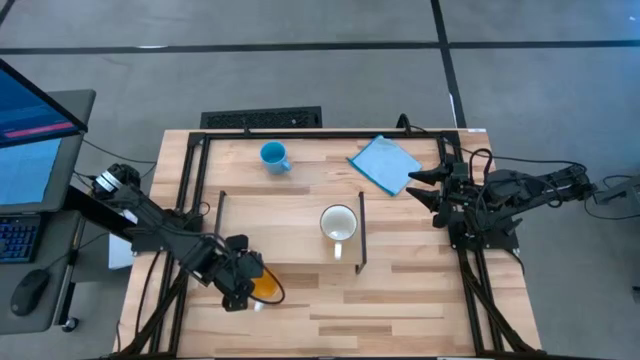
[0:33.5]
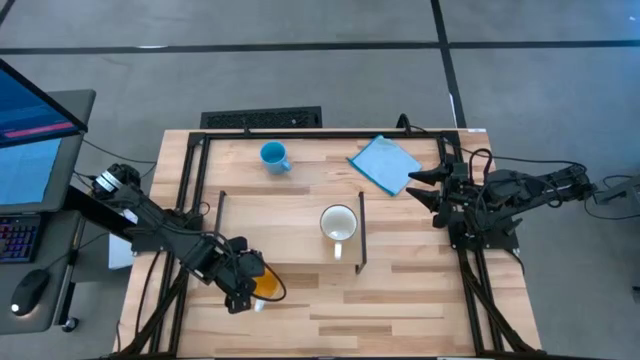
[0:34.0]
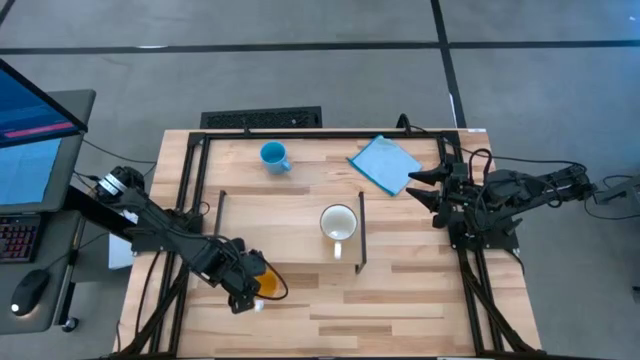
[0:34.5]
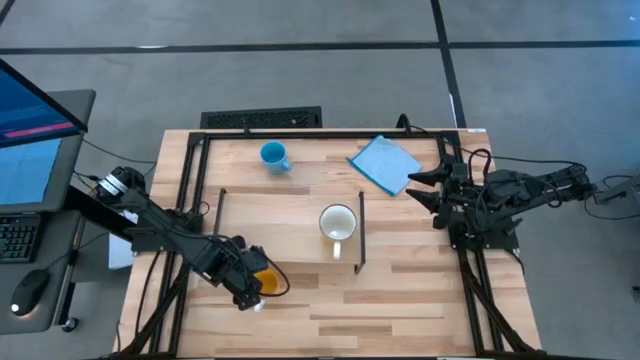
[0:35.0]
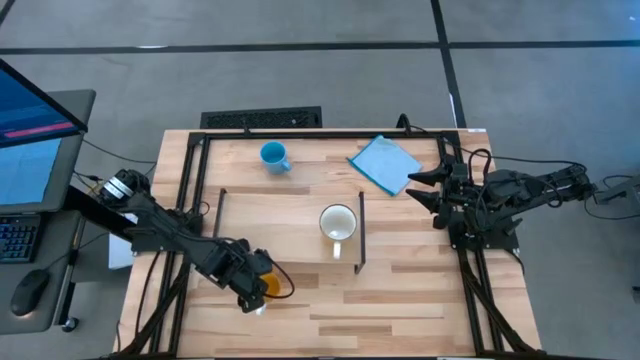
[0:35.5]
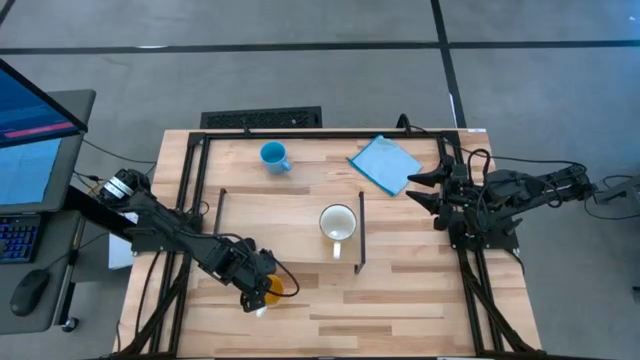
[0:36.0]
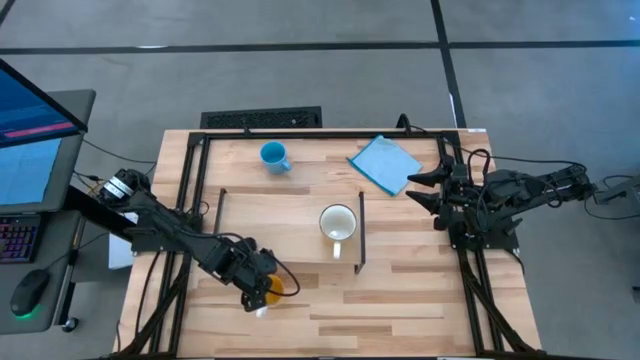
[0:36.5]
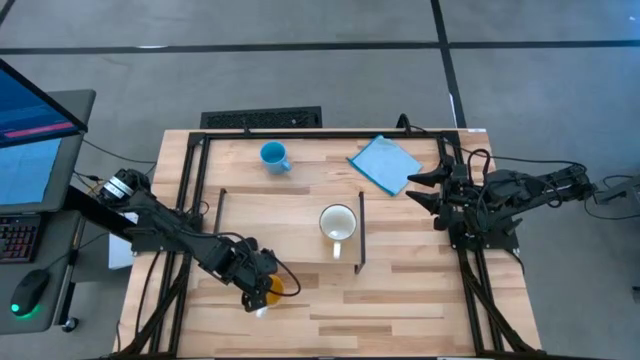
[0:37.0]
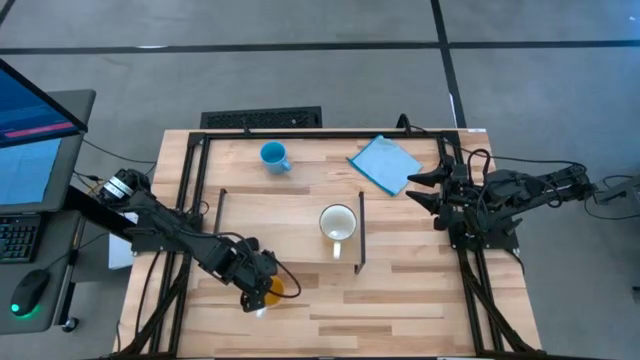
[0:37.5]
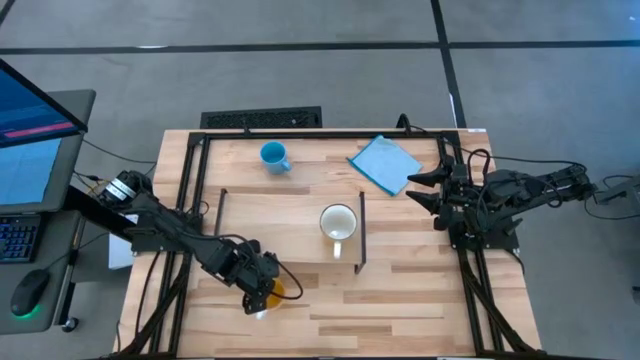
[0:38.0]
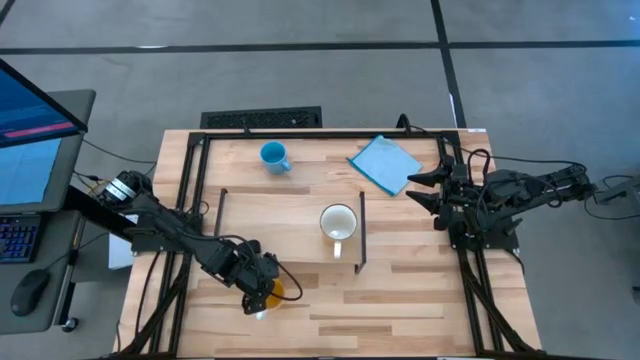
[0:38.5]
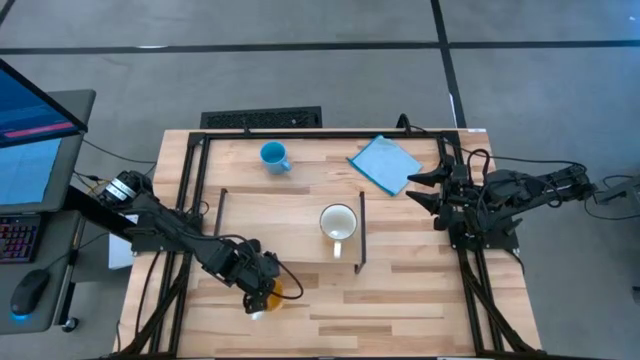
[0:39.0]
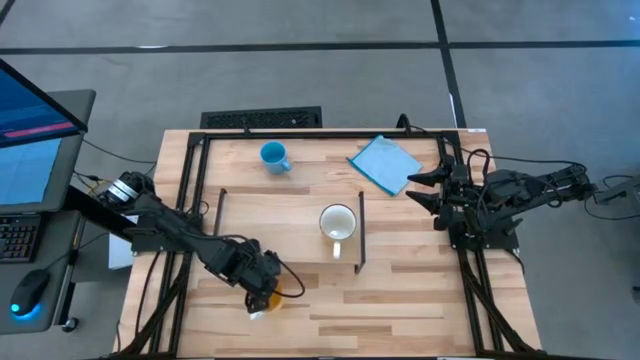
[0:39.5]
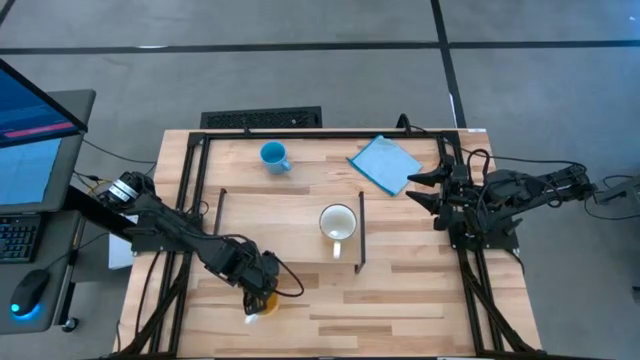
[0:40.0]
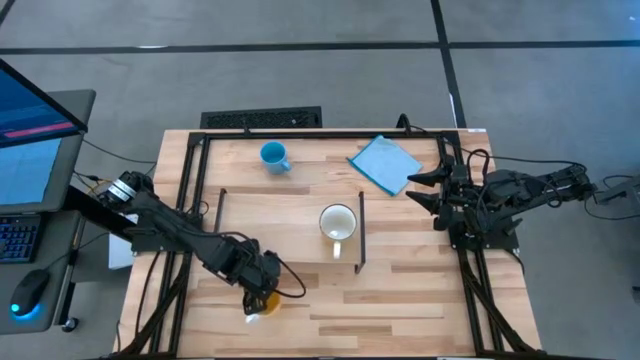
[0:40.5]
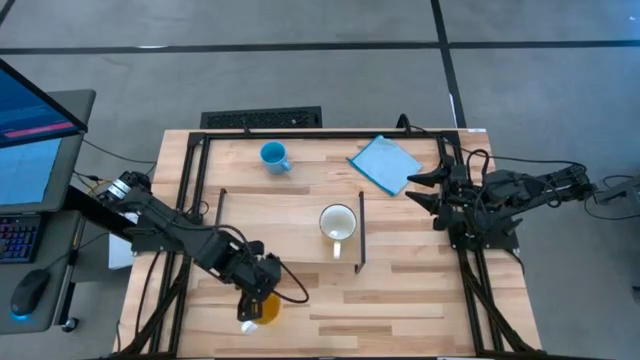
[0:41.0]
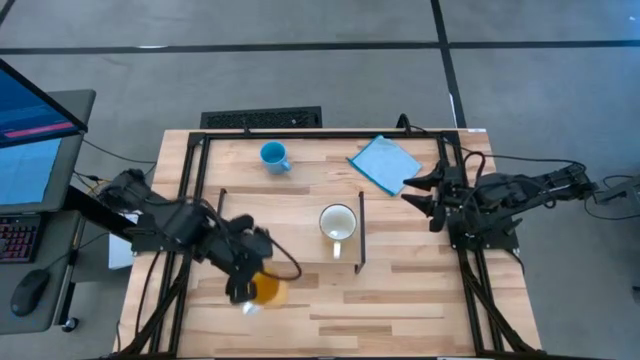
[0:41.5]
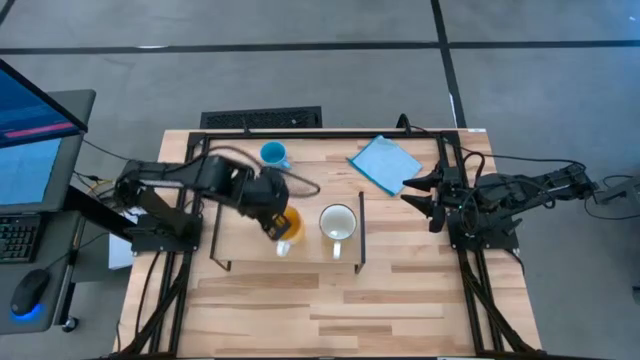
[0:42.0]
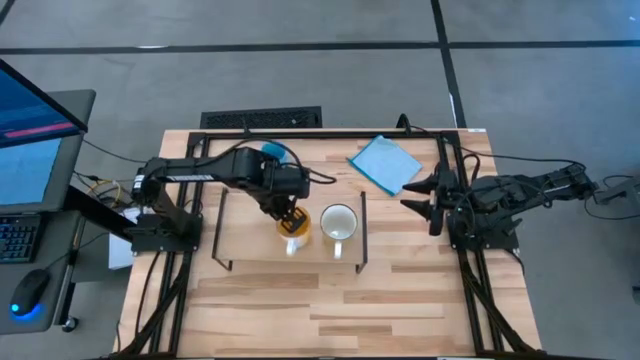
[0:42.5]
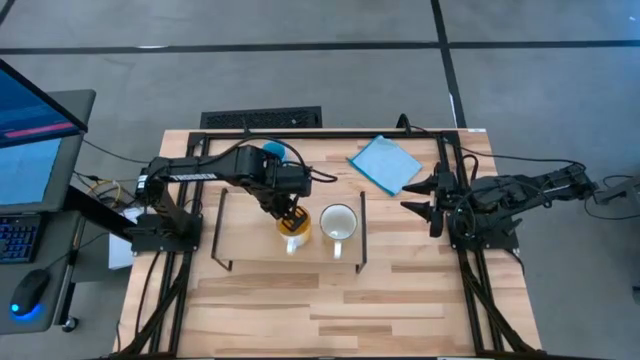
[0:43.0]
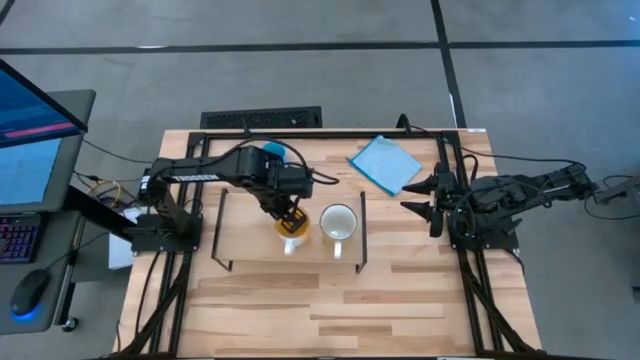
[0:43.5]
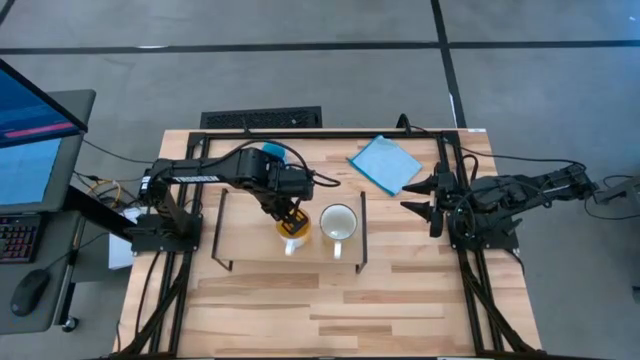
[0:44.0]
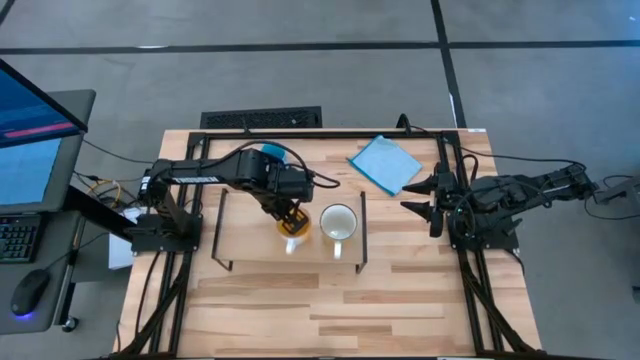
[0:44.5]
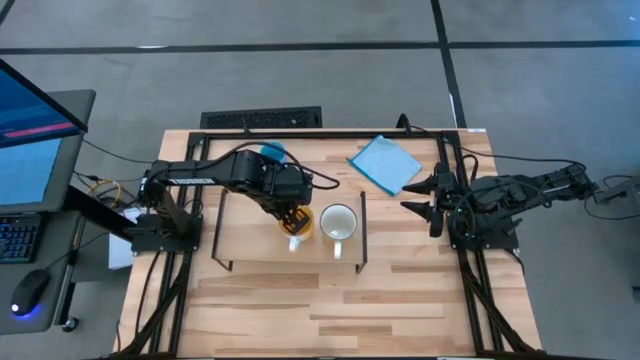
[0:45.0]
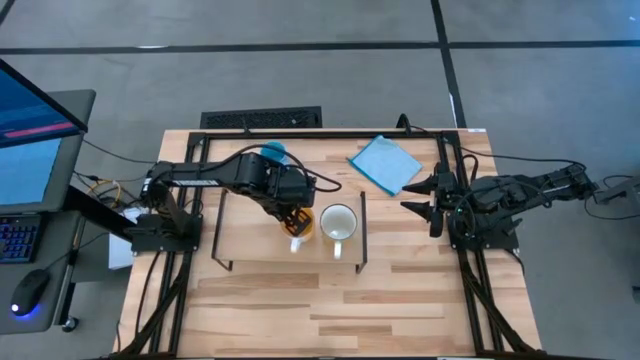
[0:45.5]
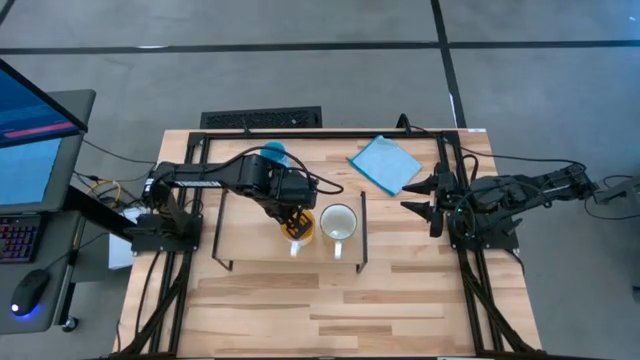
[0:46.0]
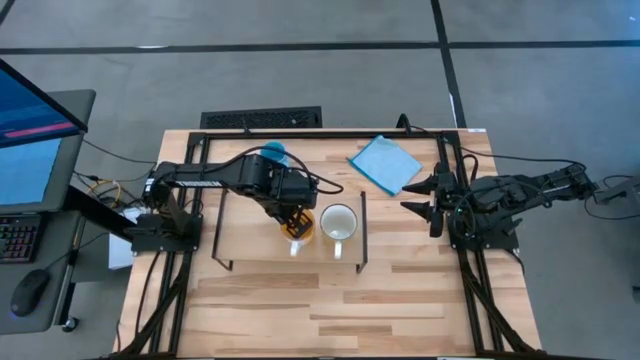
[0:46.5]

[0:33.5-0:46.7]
Task: Stack small to large cups/mugs on shelf
Put the dark yellow mug on the shelf

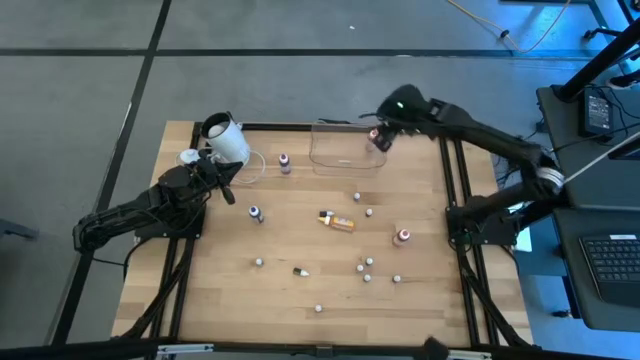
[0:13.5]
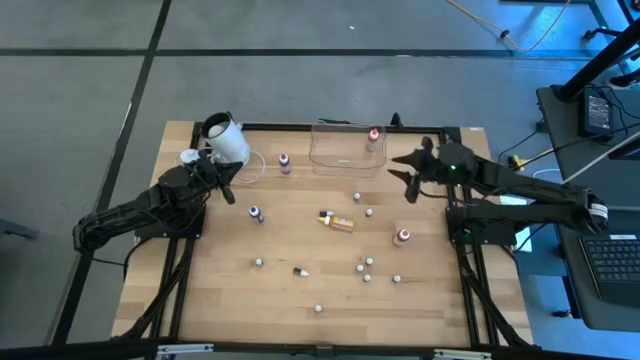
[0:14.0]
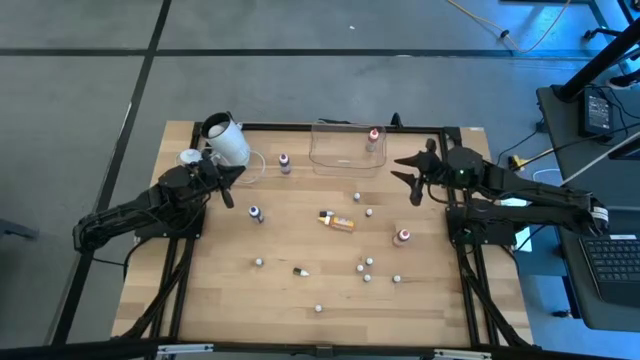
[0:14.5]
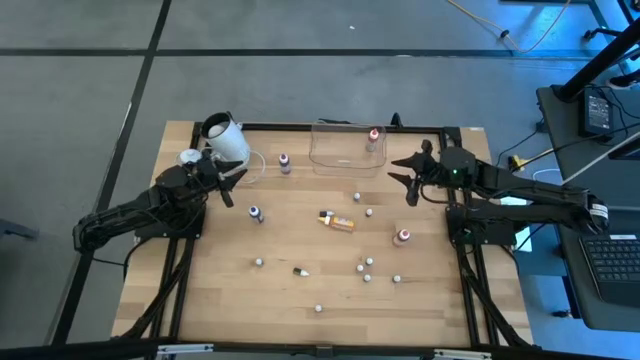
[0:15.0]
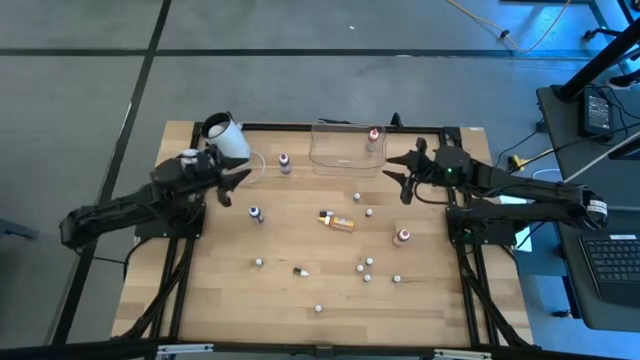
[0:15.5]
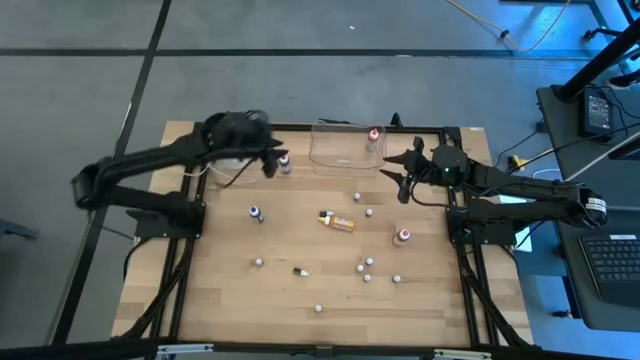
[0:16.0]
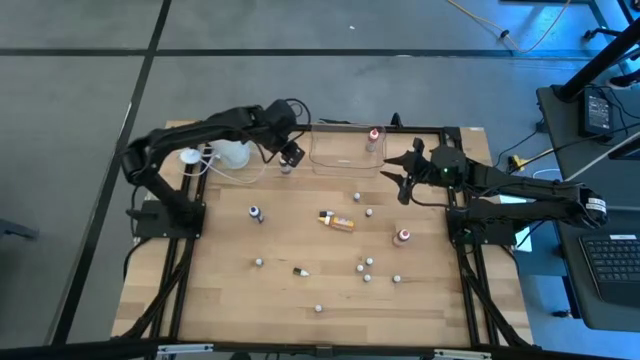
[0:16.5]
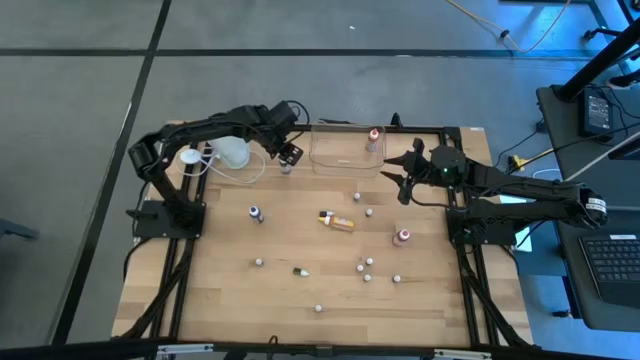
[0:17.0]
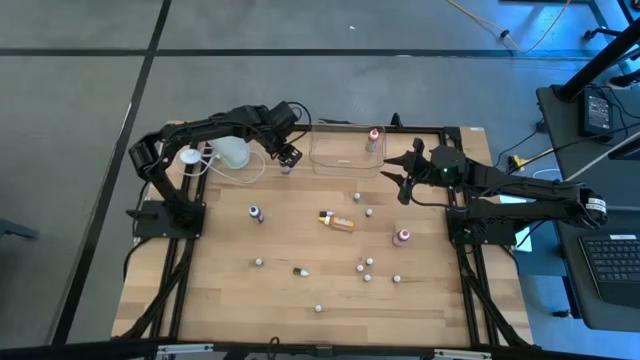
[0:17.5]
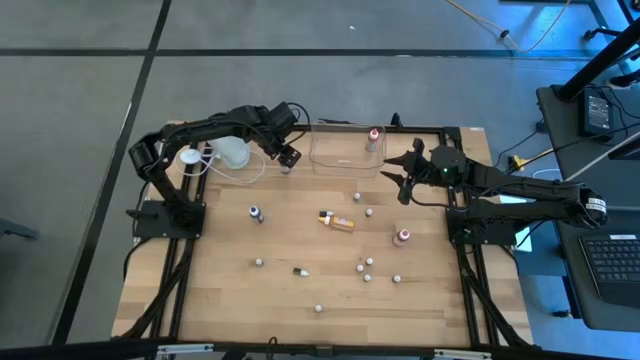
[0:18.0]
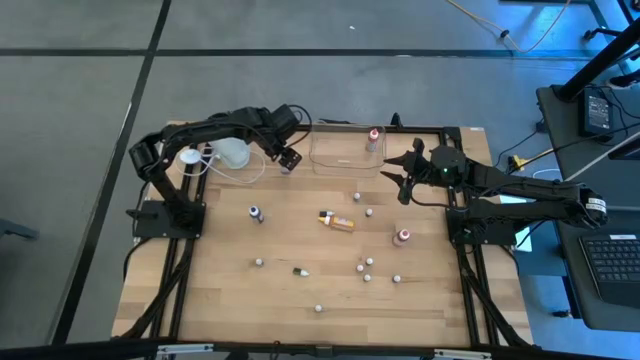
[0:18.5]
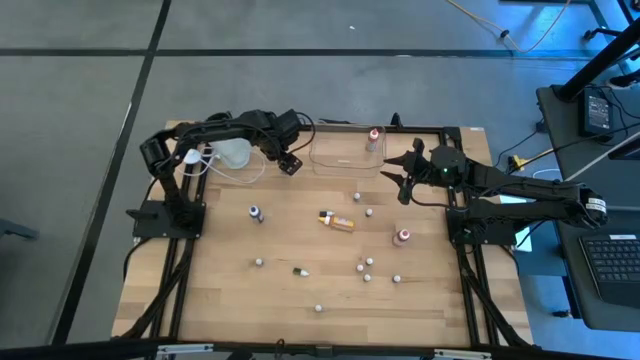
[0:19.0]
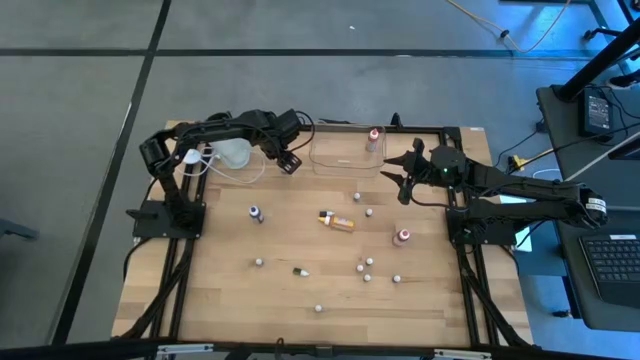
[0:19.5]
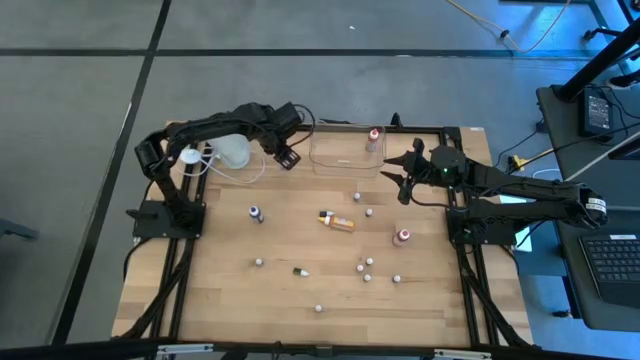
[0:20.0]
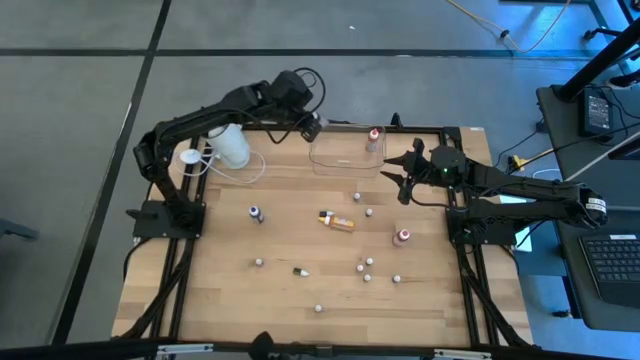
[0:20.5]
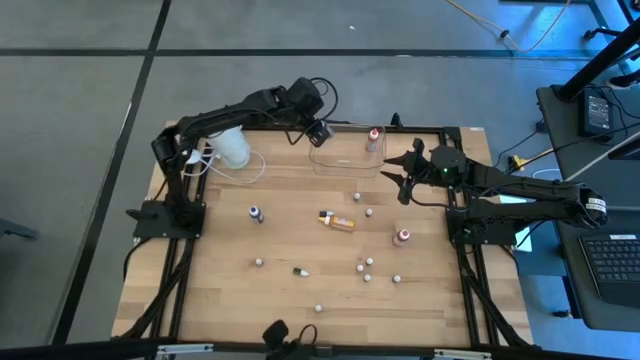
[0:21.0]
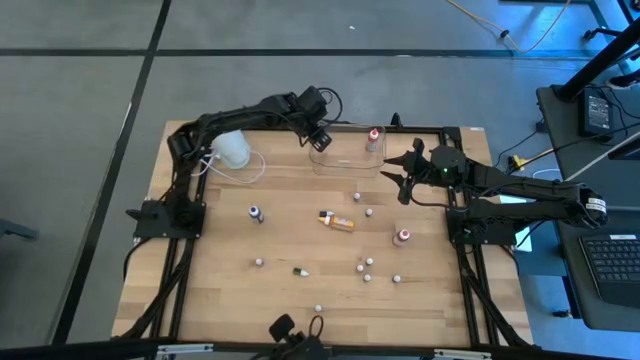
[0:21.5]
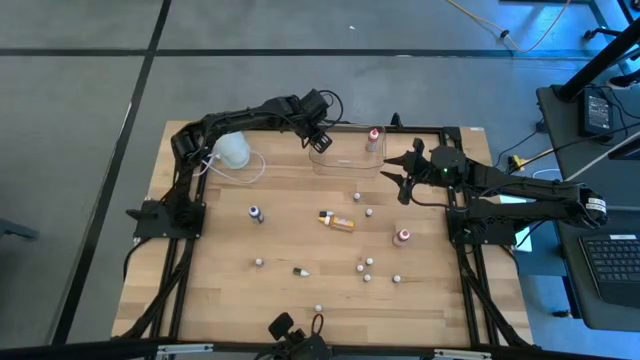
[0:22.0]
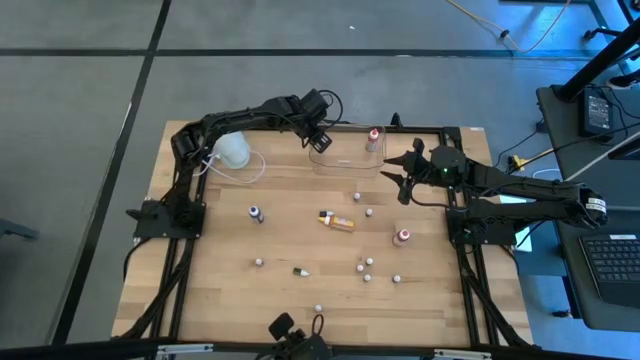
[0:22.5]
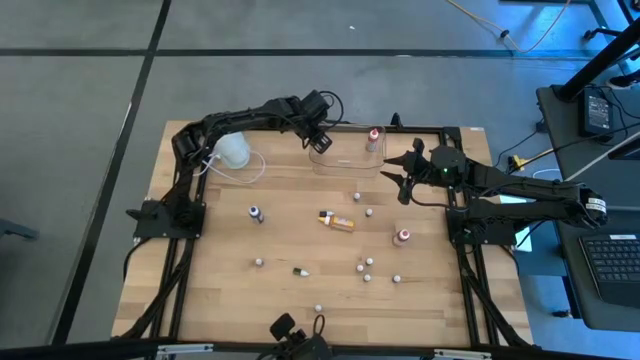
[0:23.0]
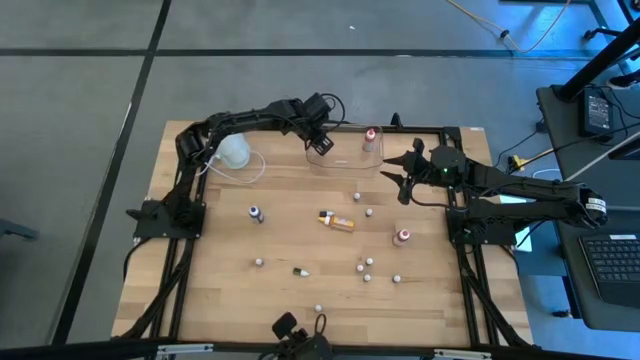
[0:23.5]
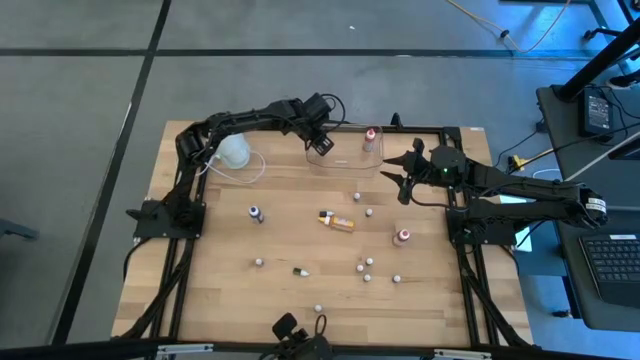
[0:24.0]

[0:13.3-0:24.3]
Task: Pick & Place food coloring
Put the large purple food coloring bottle into the transparent container
